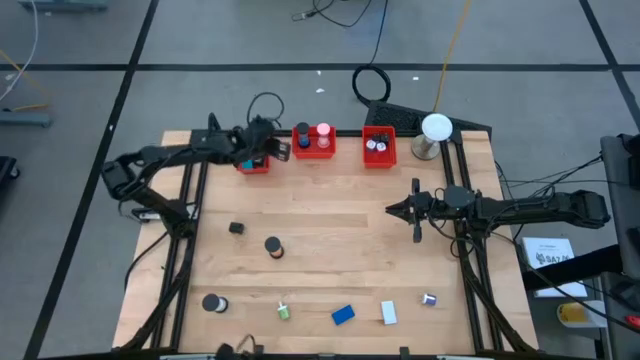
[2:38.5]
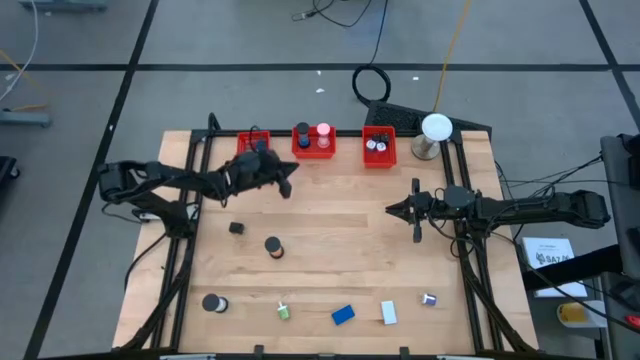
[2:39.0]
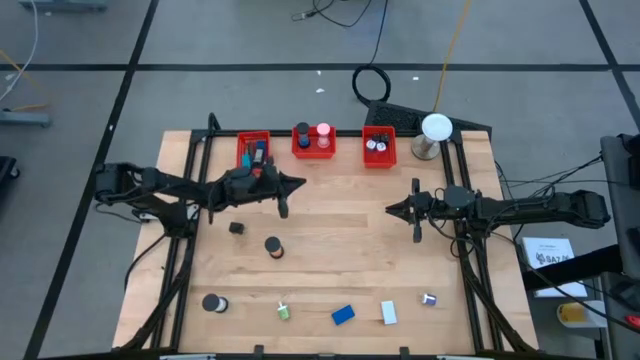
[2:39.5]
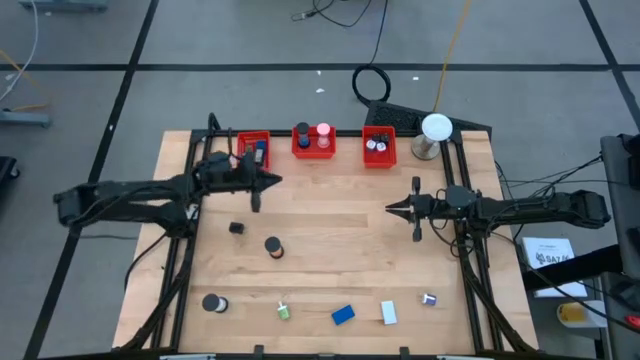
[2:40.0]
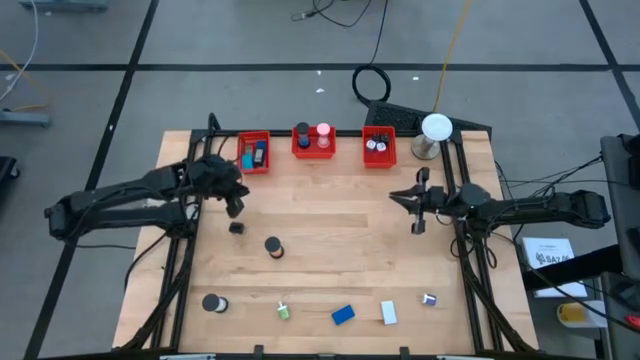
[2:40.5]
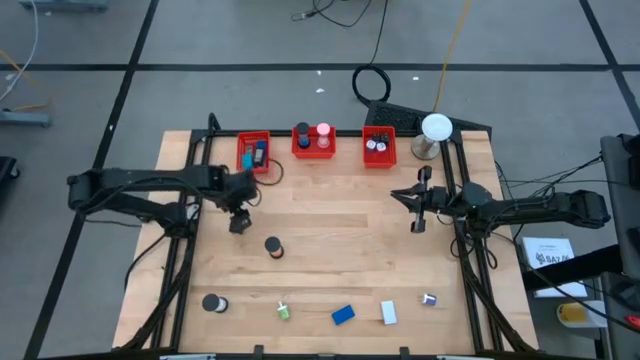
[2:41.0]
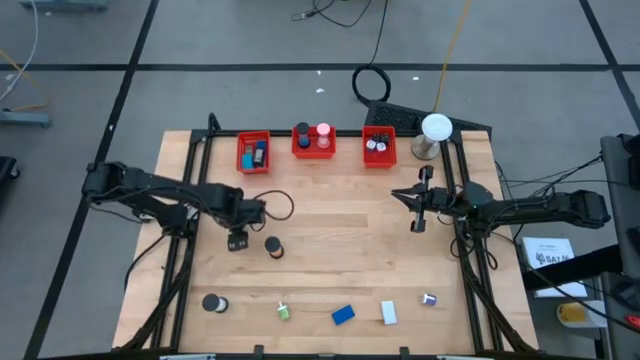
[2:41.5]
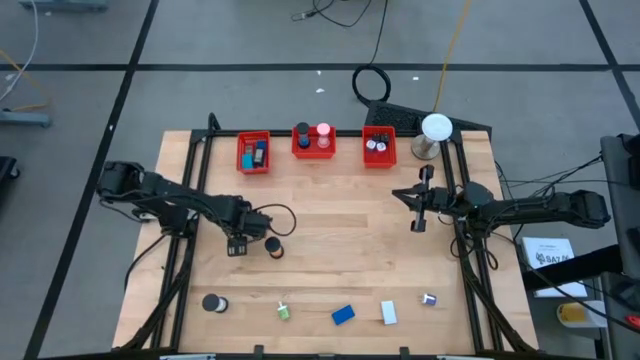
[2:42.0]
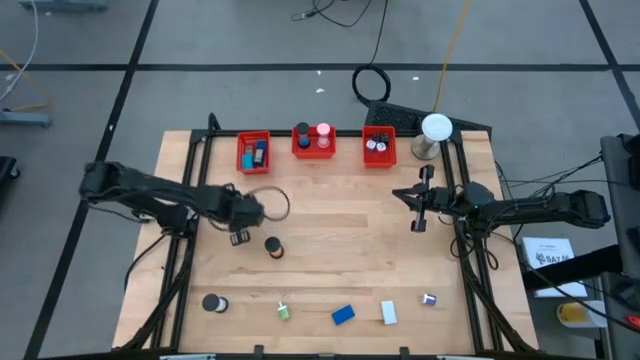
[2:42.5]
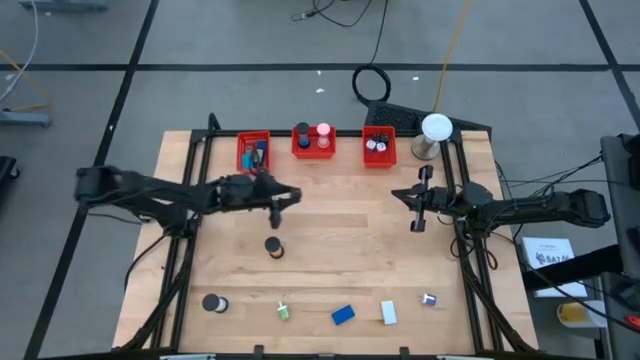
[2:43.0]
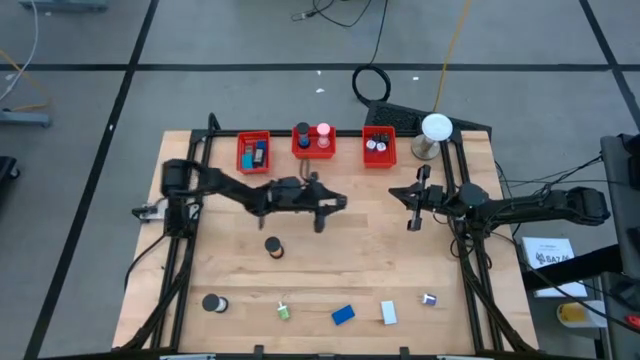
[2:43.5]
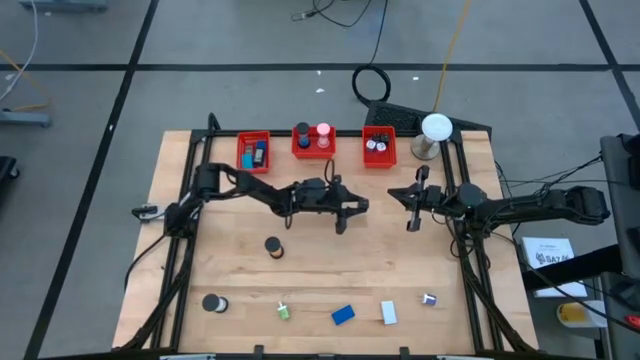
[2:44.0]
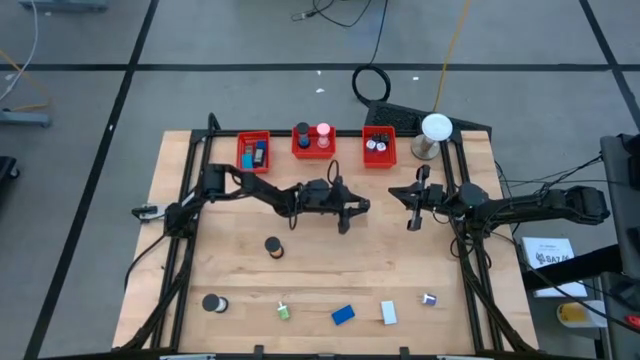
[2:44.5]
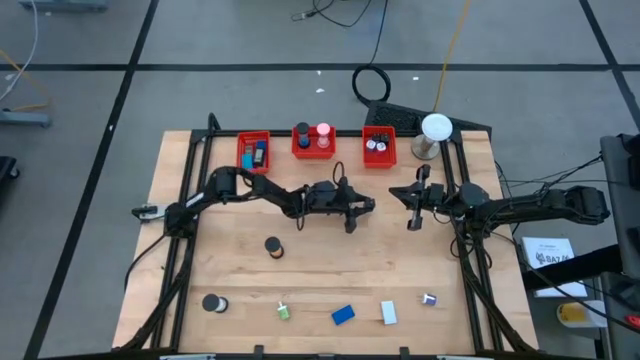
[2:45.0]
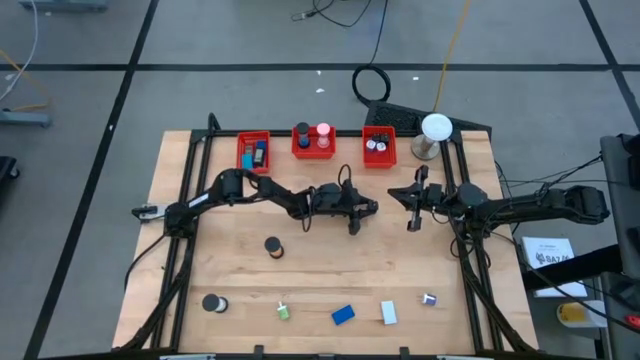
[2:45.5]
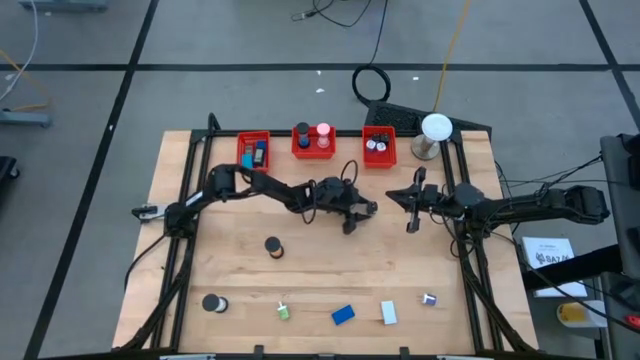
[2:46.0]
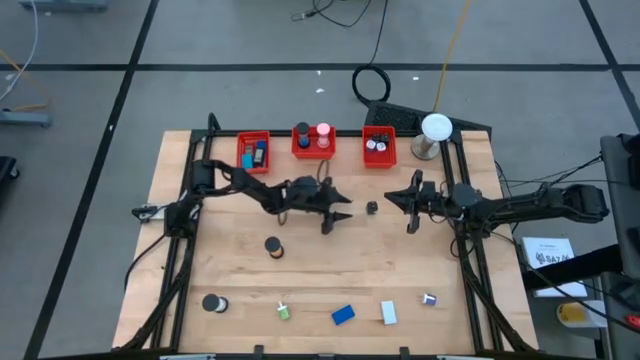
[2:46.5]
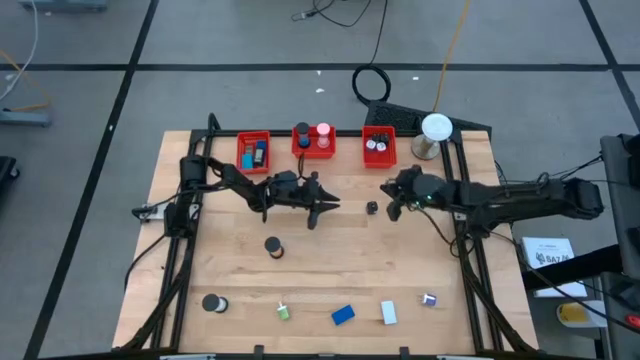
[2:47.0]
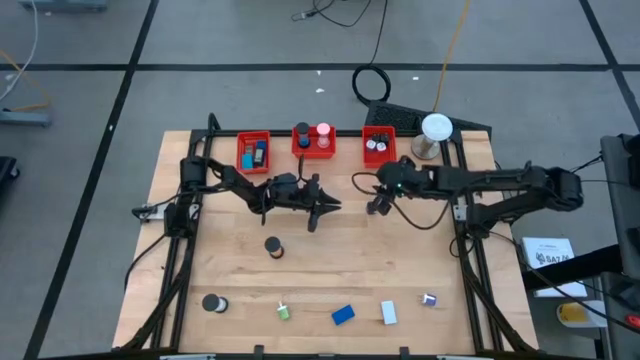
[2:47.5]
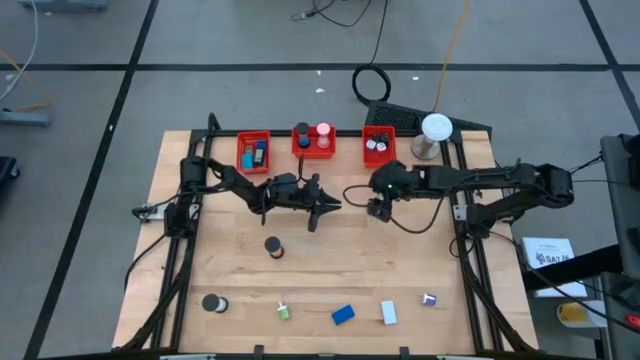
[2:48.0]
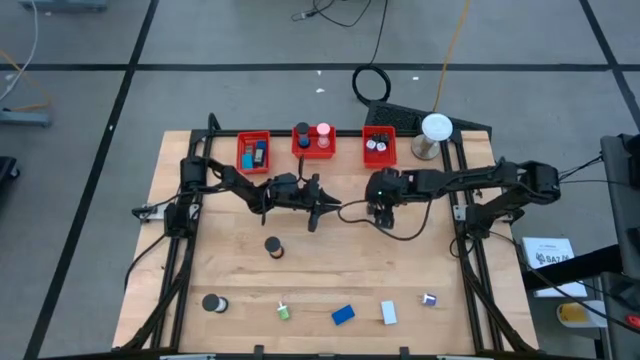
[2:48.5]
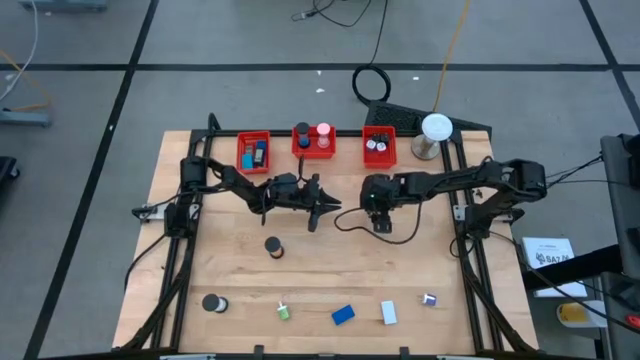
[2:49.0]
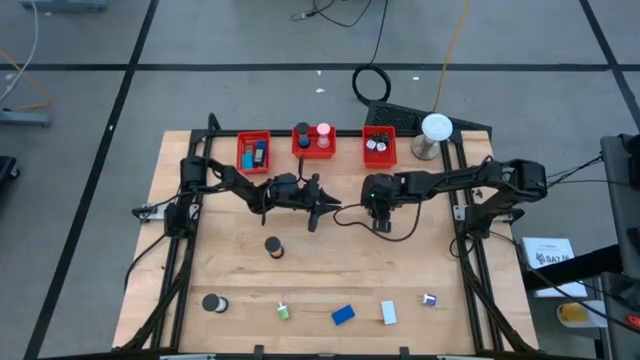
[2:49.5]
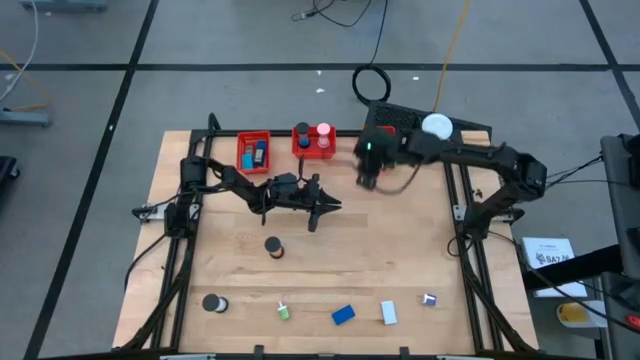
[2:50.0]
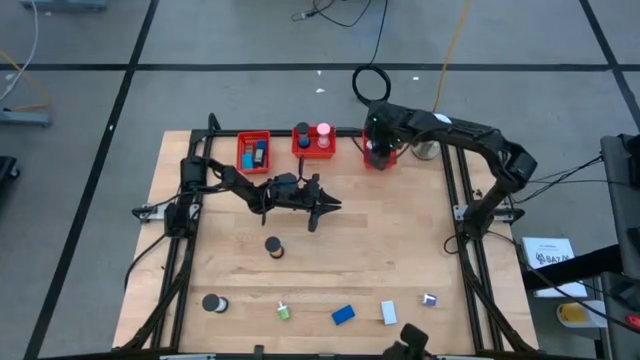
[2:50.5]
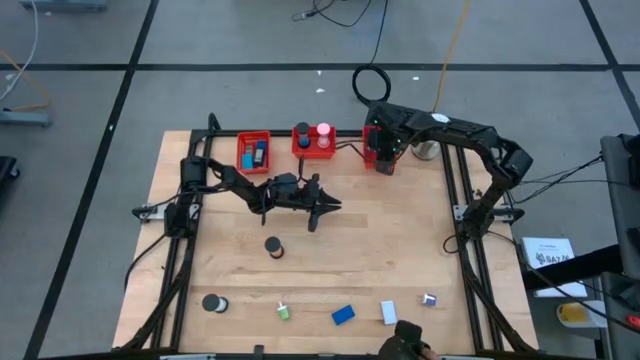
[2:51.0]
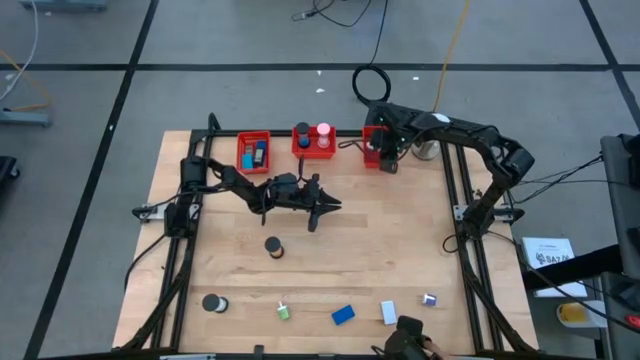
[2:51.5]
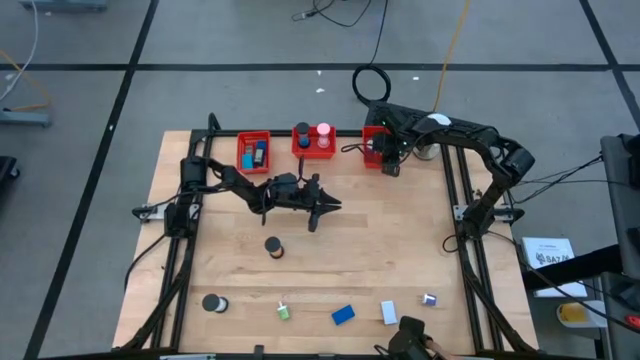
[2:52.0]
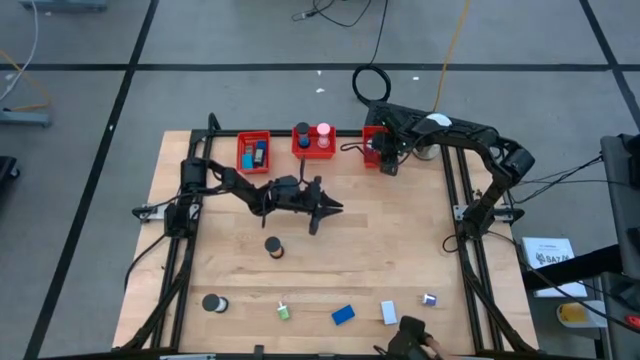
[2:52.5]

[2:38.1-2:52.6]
Task: Pick & Place Office items
Put the black charger adapter into the right orange basket

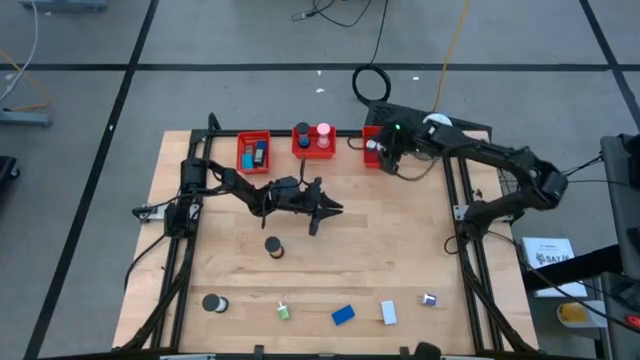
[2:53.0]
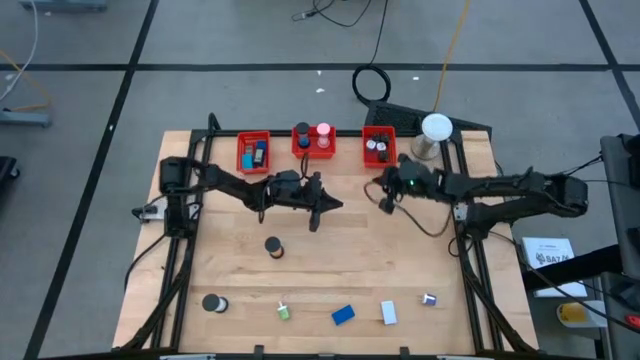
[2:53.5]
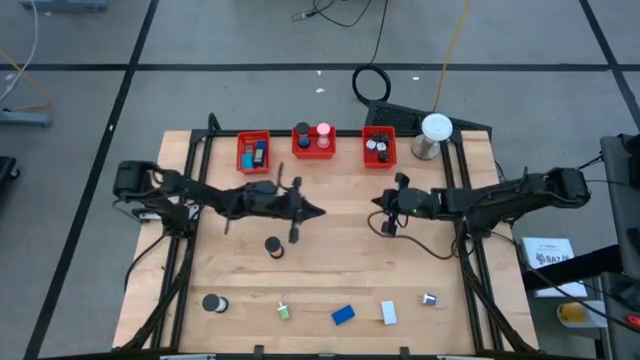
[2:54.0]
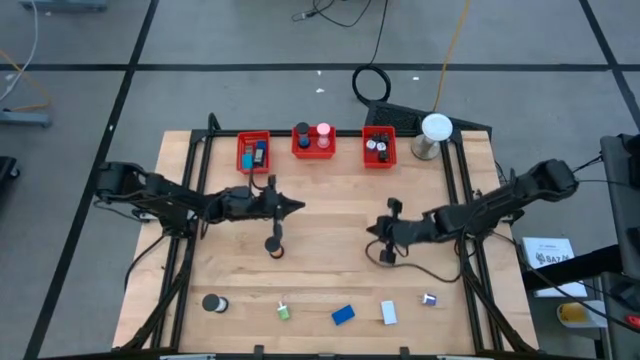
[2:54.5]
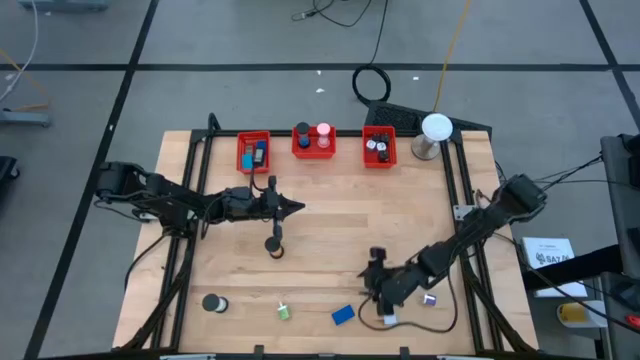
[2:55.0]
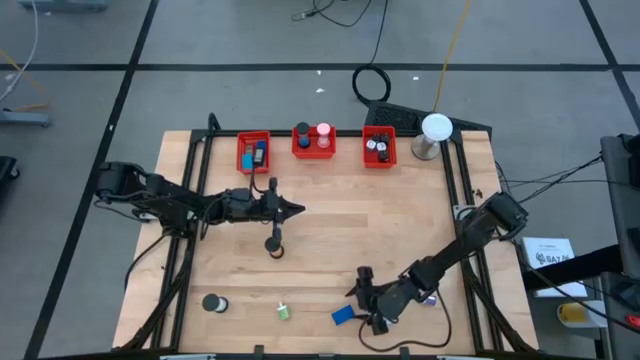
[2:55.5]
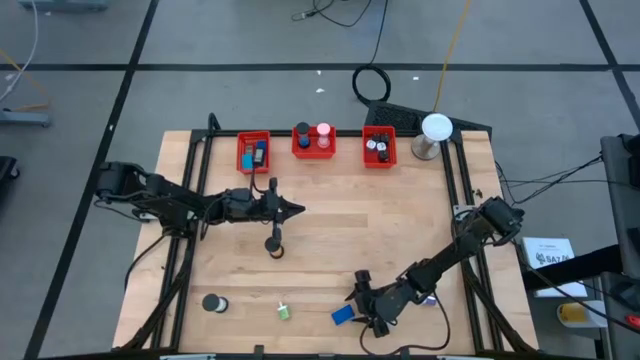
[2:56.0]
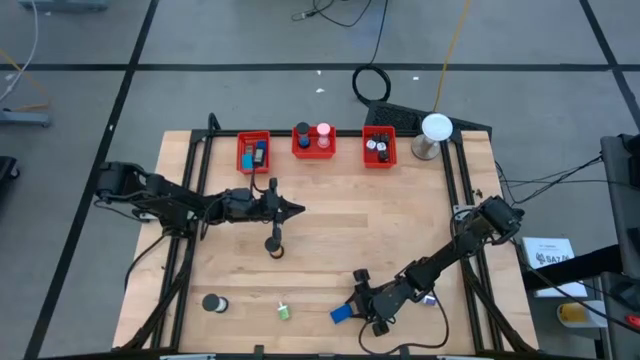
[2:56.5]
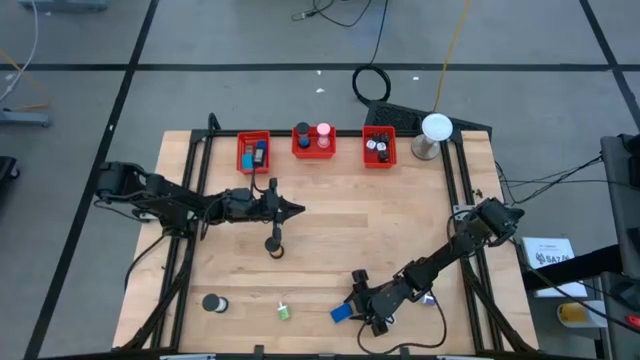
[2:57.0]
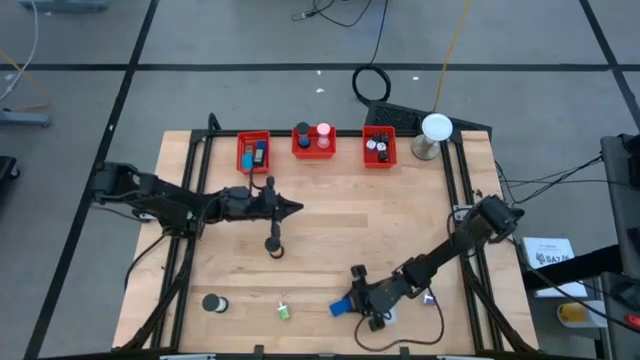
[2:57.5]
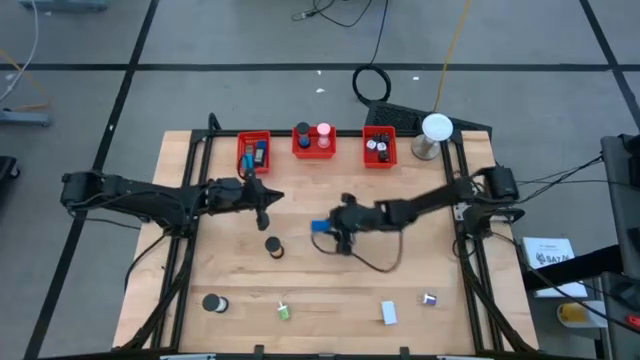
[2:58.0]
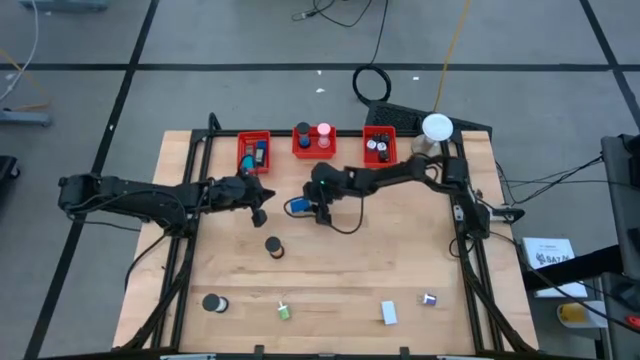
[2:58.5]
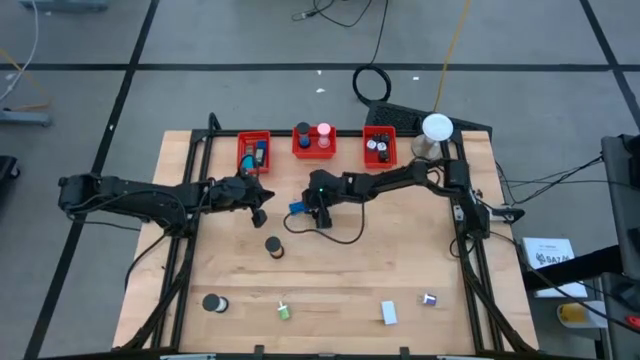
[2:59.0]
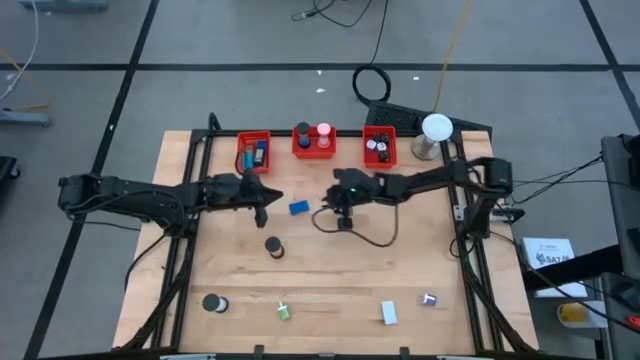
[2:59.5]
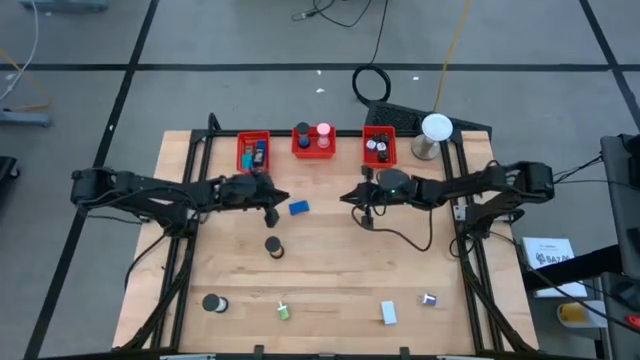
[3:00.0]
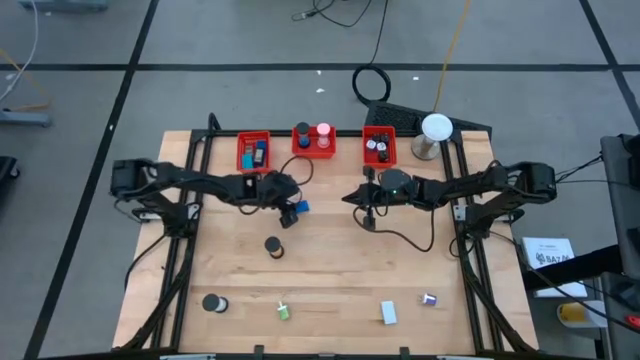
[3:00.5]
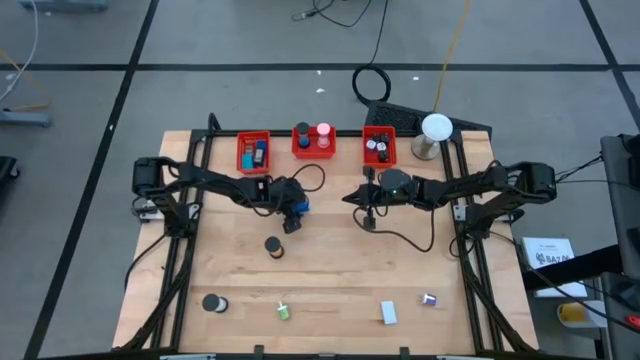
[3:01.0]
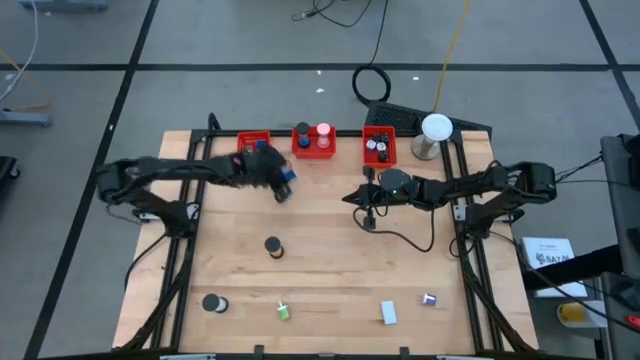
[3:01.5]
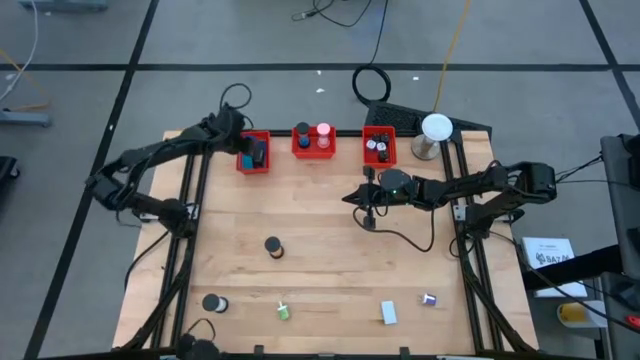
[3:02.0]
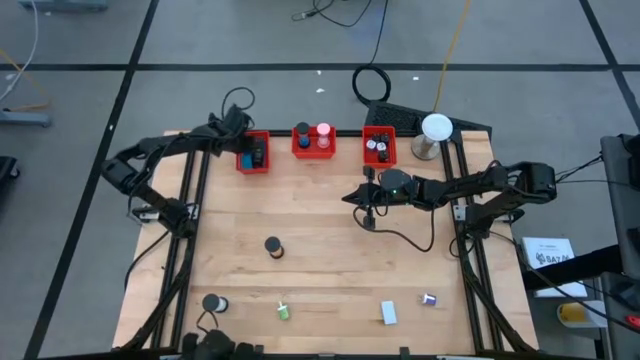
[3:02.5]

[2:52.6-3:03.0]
Put the blue timer into the left orange basket
